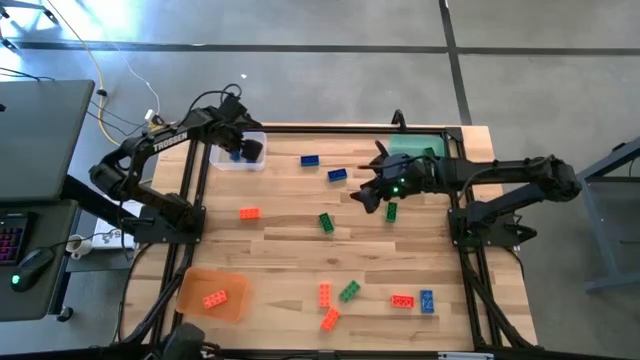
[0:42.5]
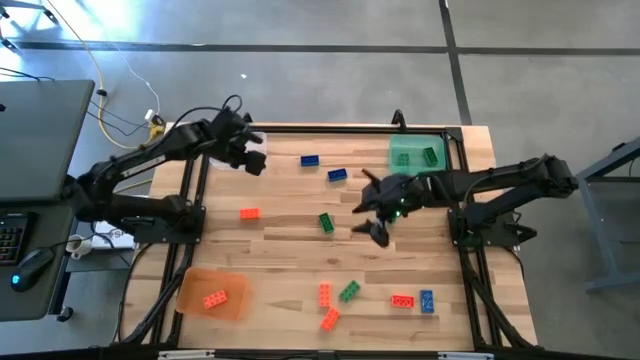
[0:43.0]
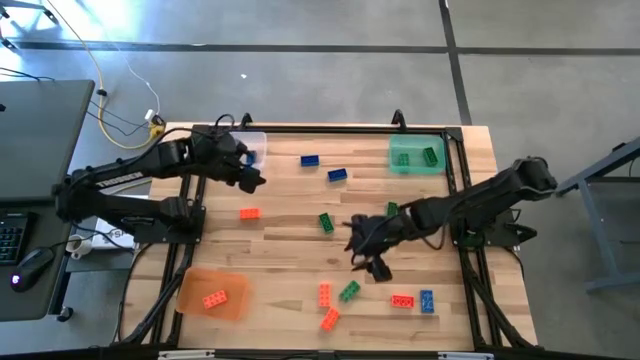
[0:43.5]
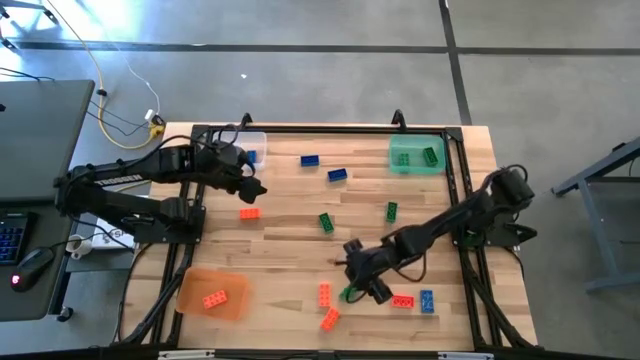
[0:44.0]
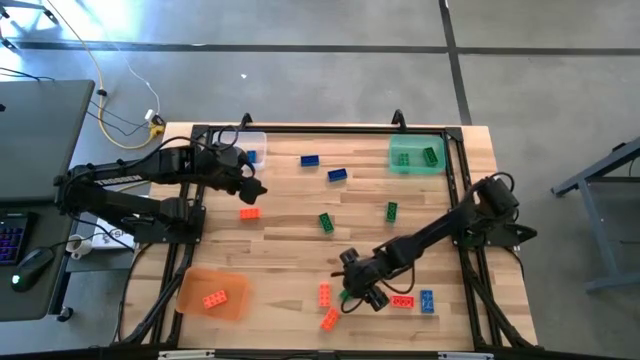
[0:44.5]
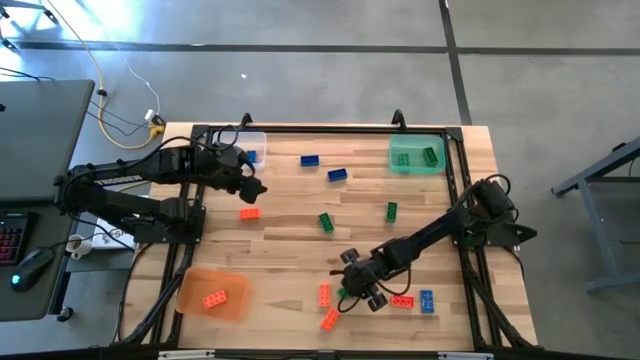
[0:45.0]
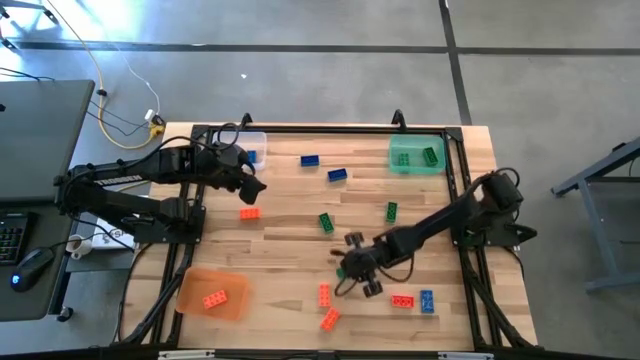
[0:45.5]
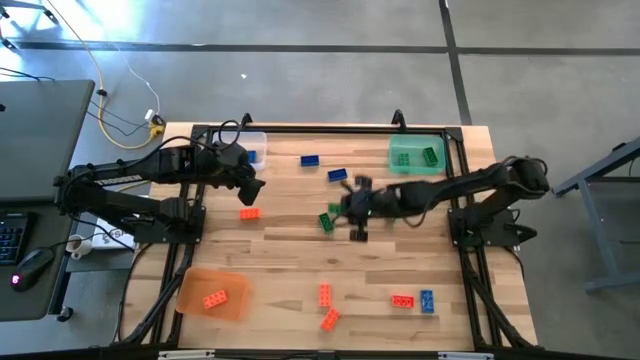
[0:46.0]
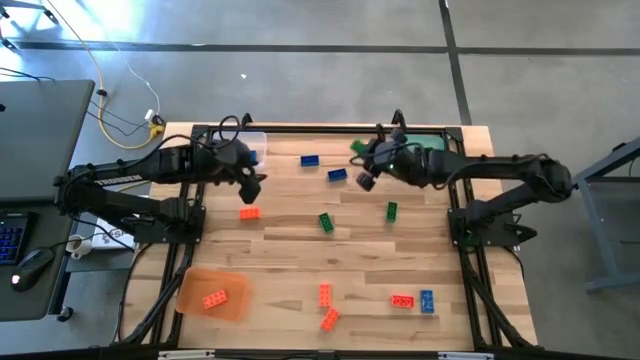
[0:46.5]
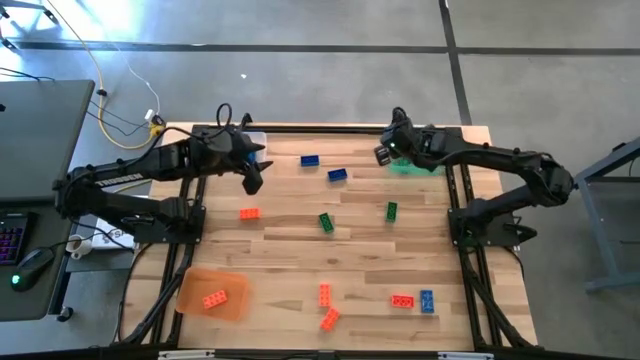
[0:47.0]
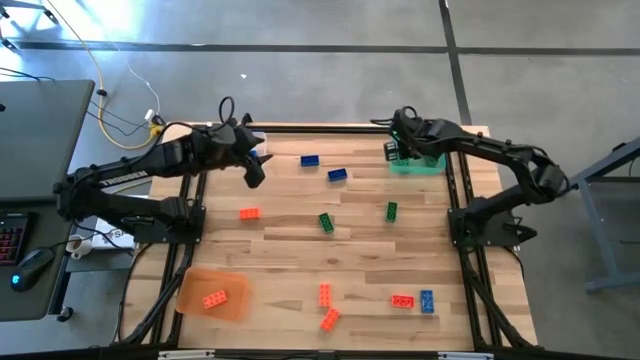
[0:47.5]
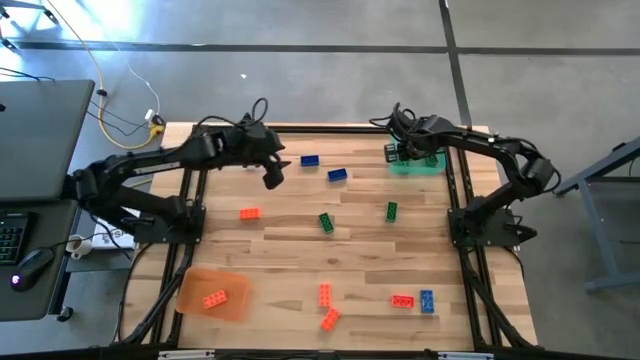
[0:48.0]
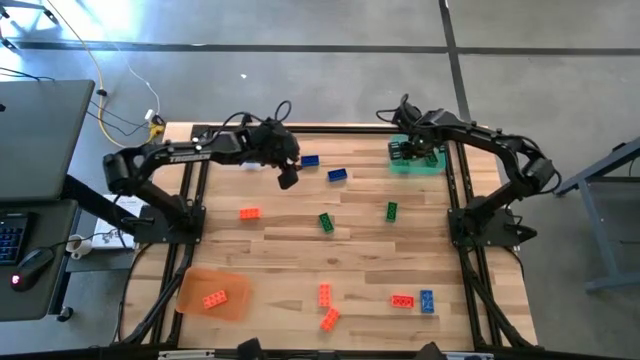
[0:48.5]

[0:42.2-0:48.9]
Task: Sort & place blocks by color
Put the green game piece into the green bin

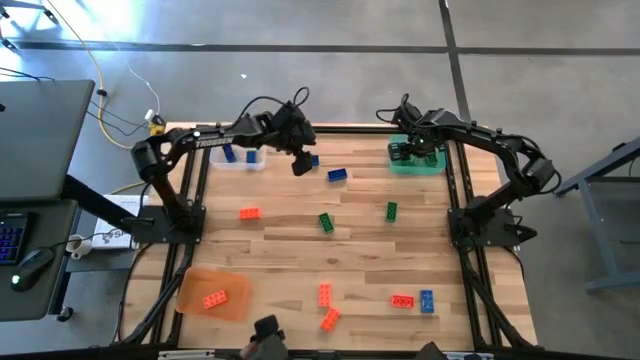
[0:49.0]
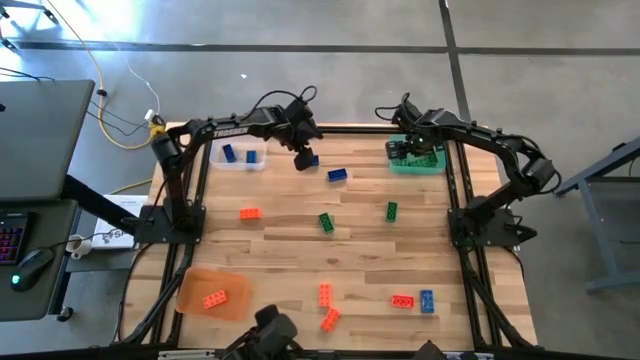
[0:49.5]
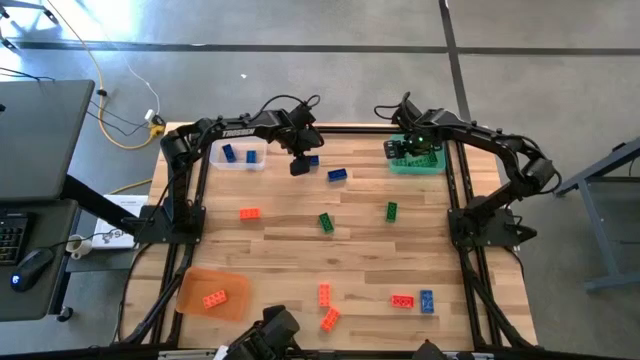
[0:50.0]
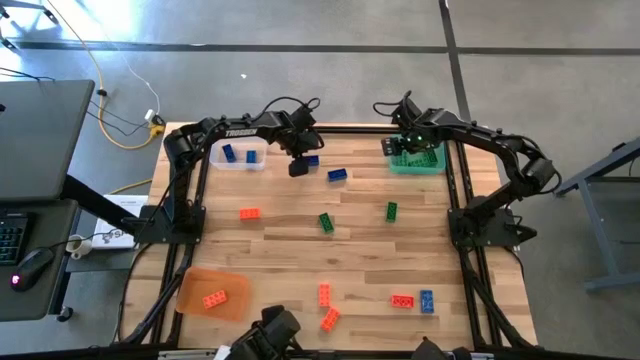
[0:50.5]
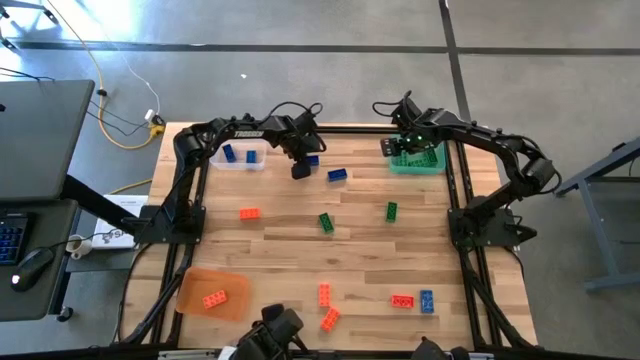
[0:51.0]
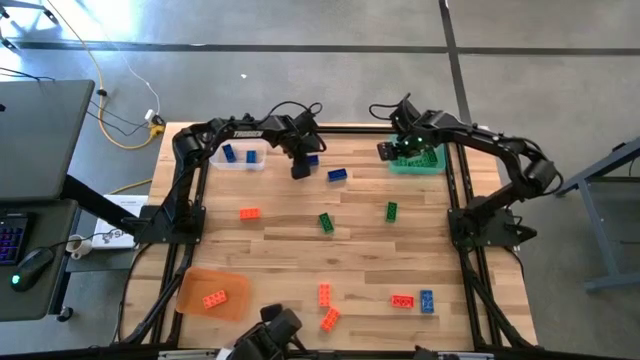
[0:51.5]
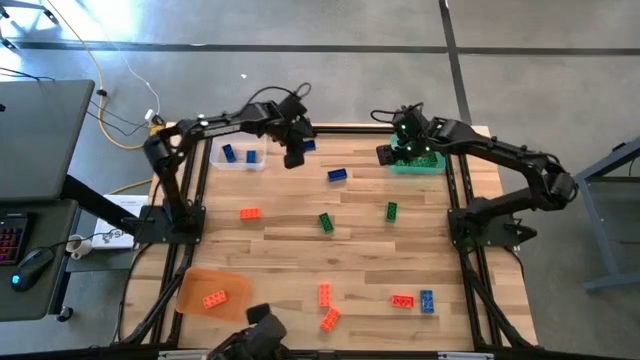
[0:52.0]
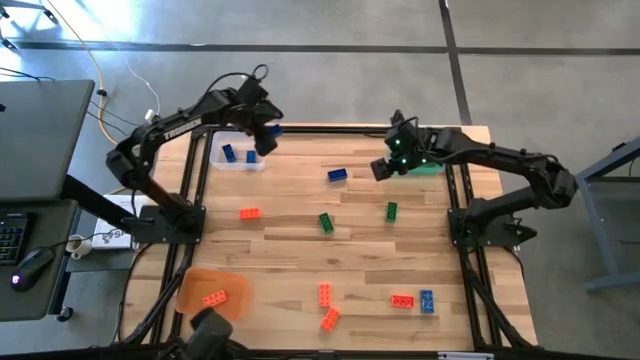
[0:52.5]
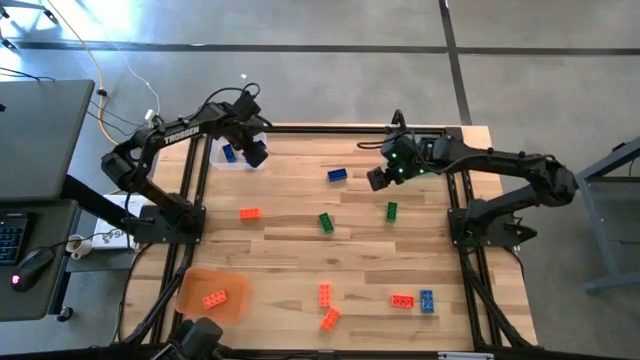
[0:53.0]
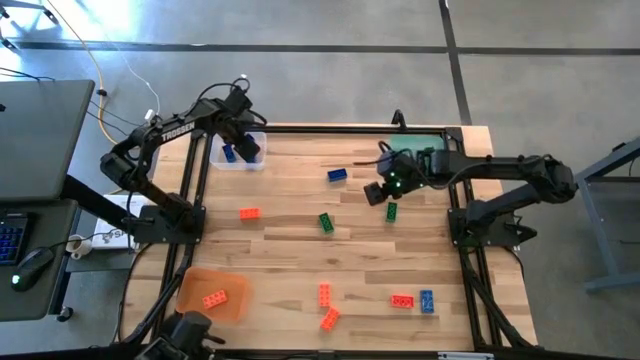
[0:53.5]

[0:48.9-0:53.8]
Put the blue game piece into the transparent bin

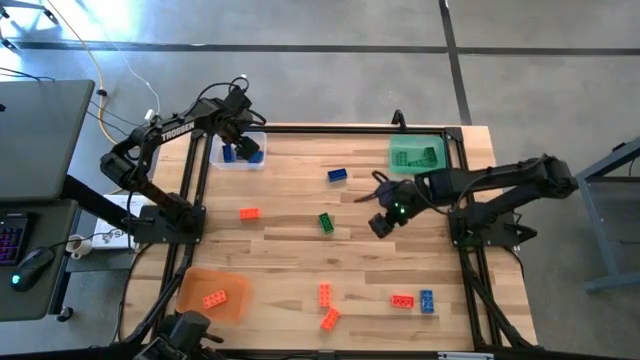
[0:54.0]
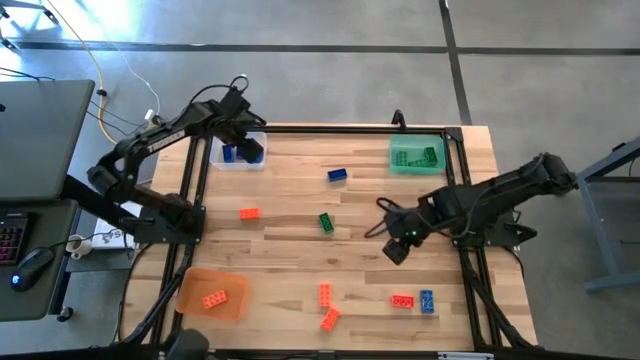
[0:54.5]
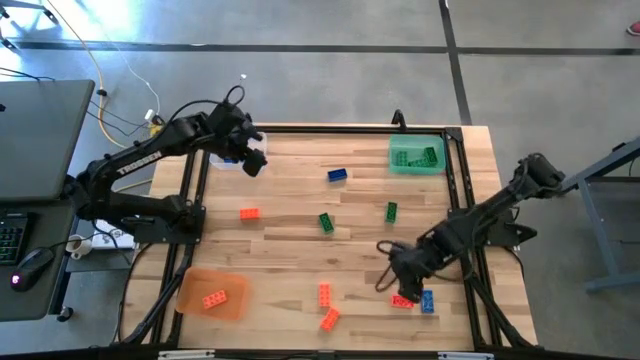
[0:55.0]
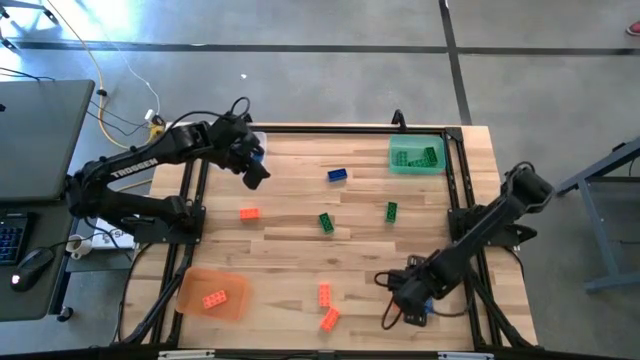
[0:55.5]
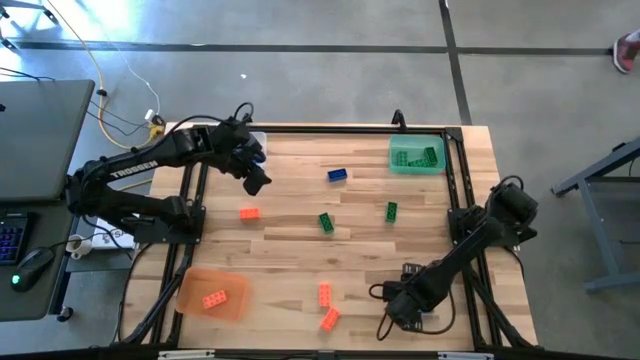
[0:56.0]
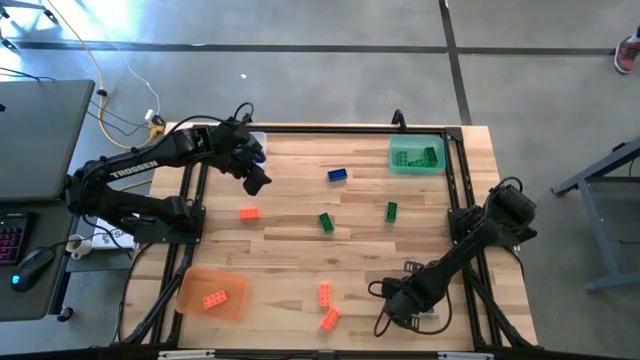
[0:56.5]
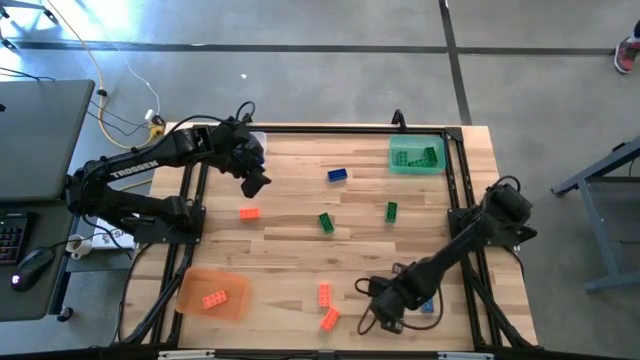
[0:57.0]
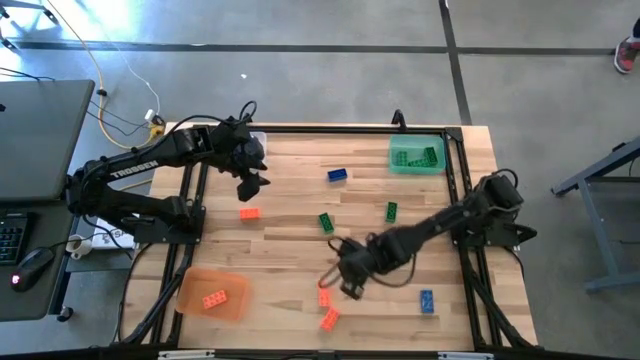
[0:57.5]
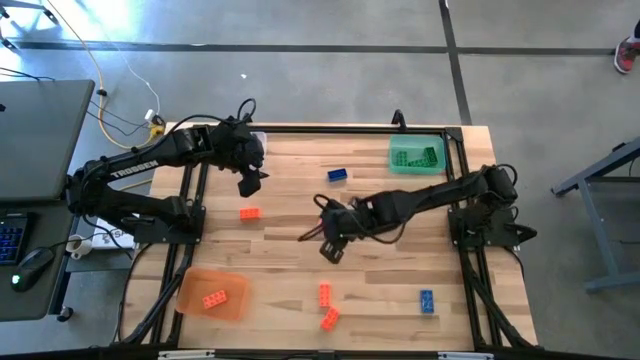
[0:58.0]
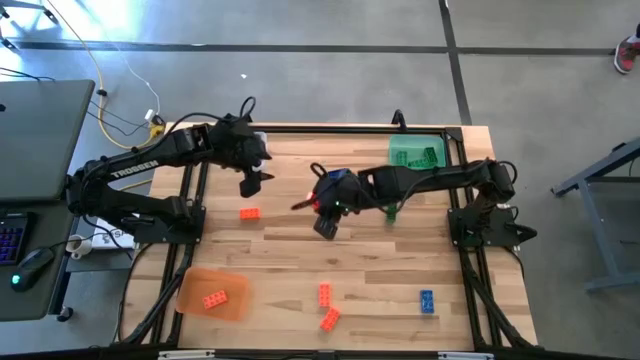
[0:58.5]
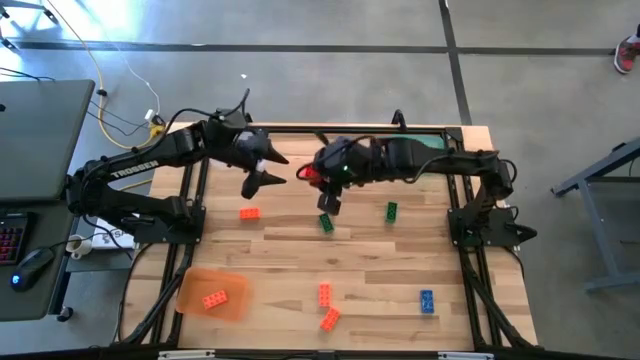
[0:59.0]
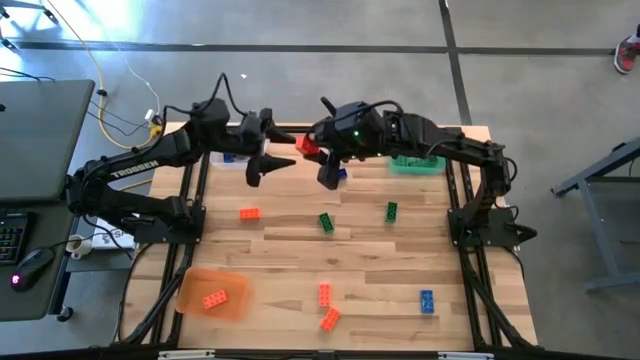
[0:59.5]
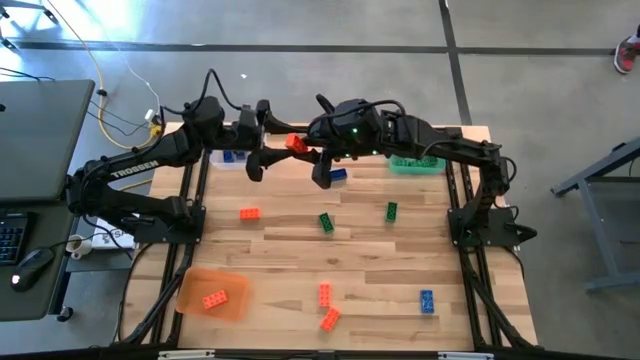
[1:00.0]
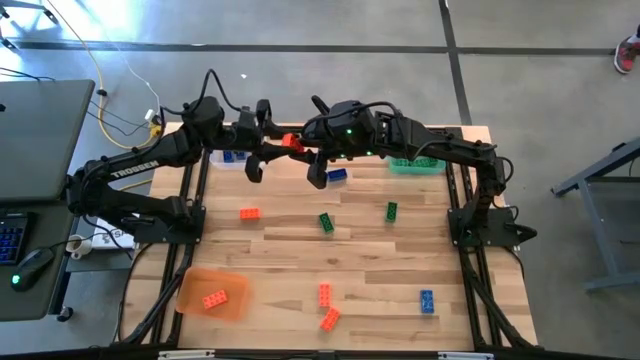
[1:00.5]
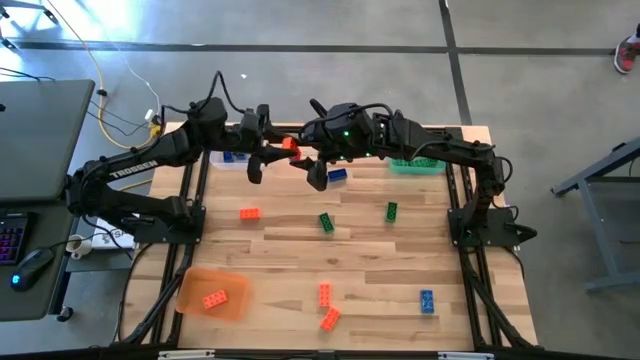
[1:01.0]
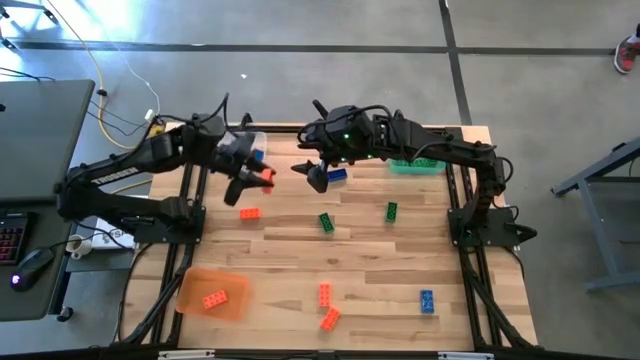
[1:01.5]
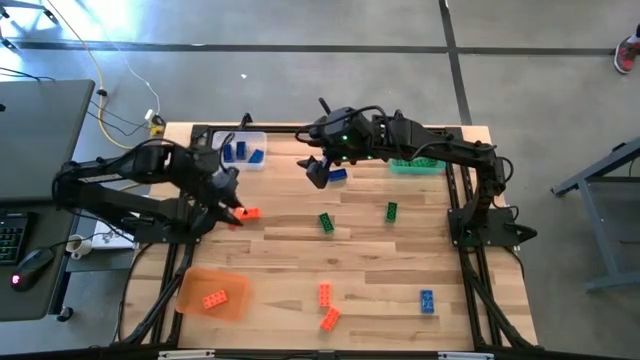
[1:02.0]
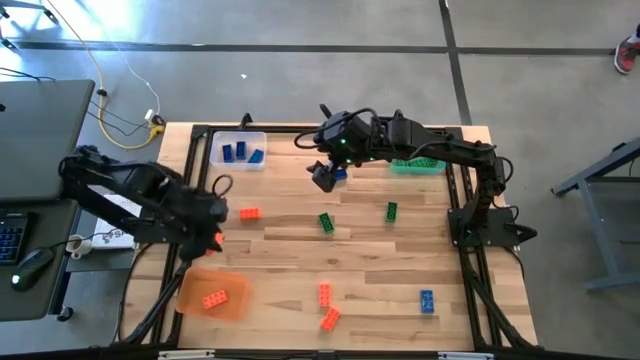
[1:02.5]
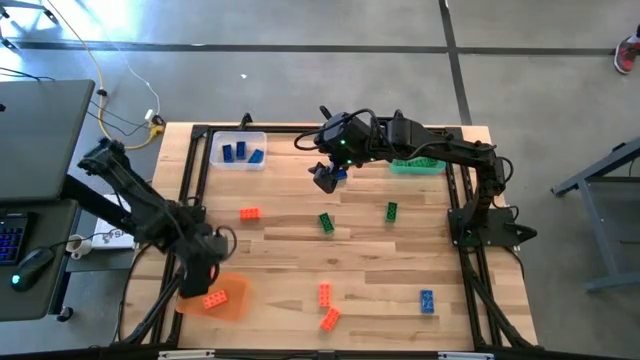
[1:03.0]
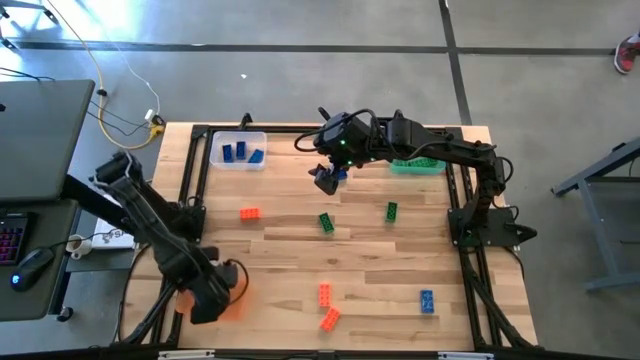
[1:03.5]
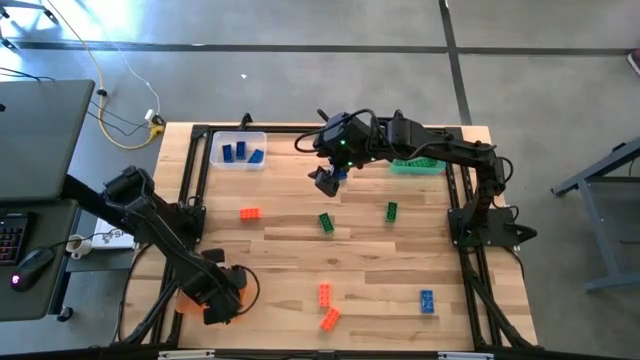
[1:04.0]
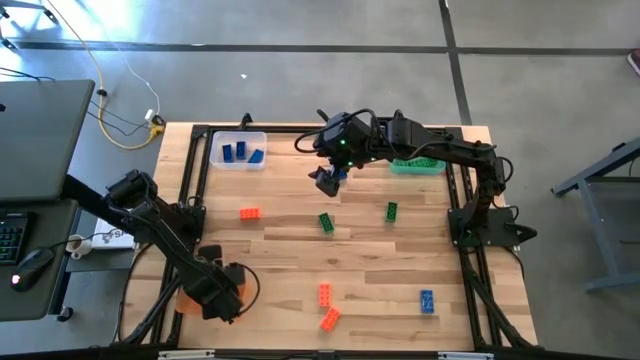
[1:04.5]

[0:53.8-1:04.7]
Put the orange game piece into the orange bin
